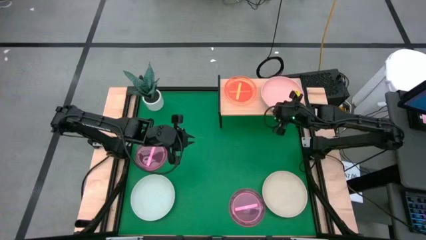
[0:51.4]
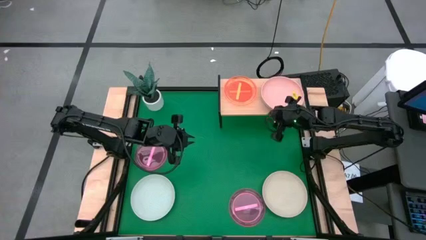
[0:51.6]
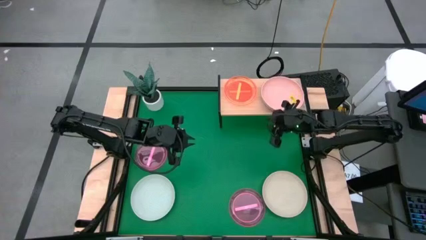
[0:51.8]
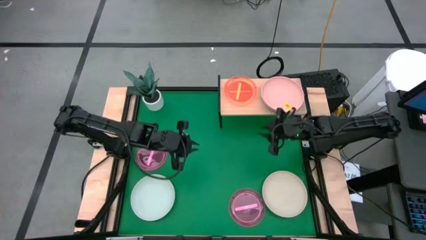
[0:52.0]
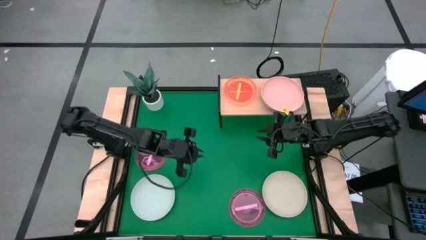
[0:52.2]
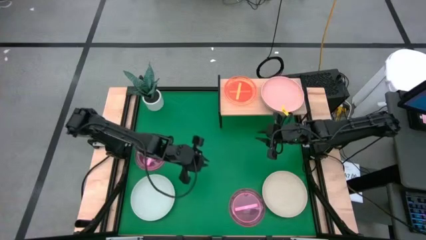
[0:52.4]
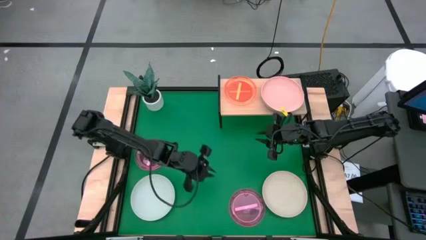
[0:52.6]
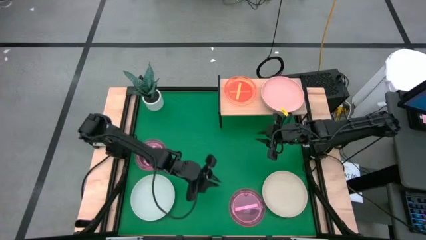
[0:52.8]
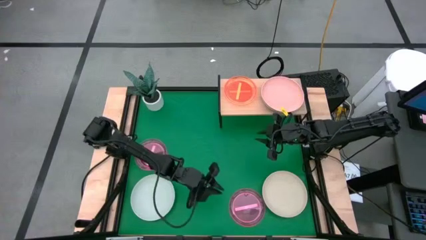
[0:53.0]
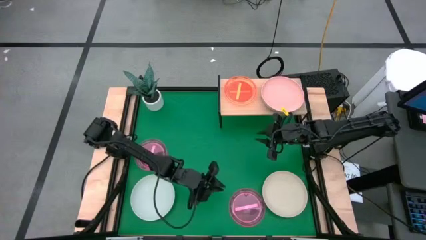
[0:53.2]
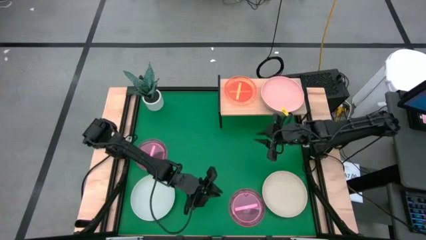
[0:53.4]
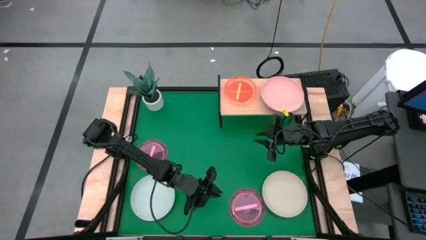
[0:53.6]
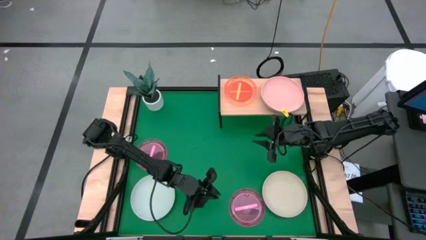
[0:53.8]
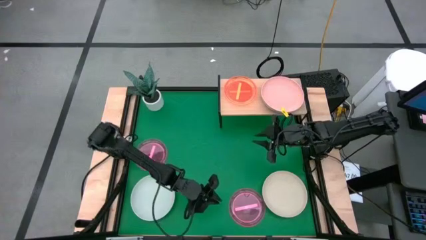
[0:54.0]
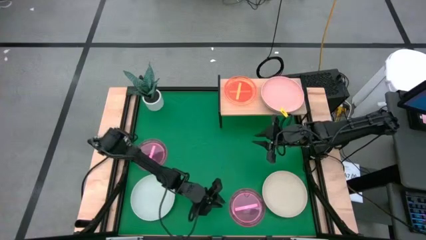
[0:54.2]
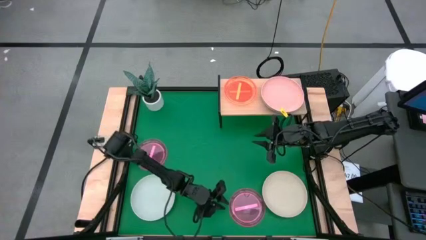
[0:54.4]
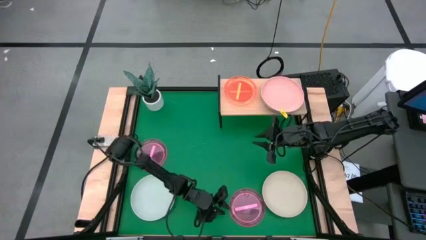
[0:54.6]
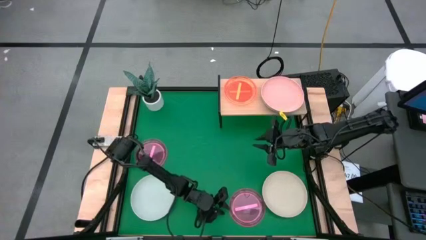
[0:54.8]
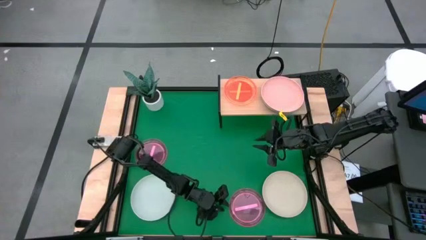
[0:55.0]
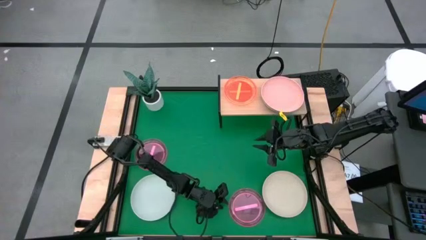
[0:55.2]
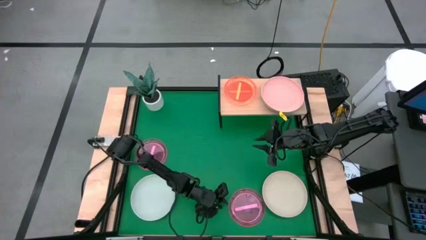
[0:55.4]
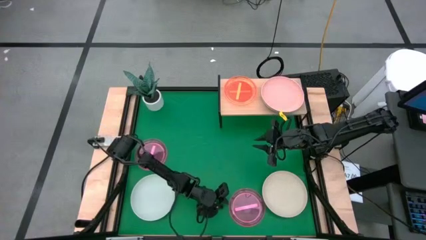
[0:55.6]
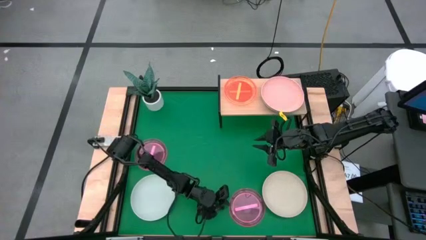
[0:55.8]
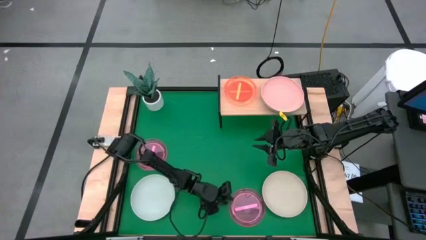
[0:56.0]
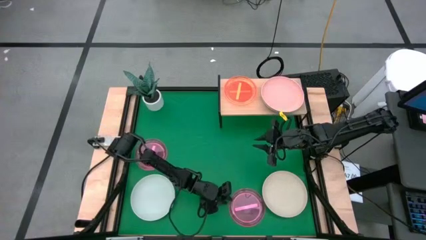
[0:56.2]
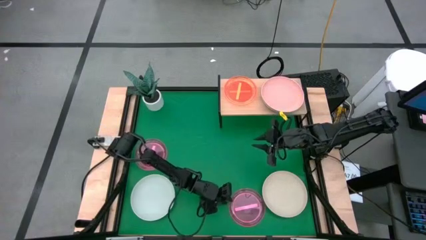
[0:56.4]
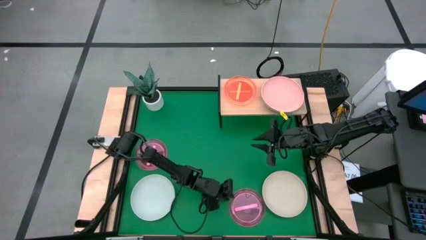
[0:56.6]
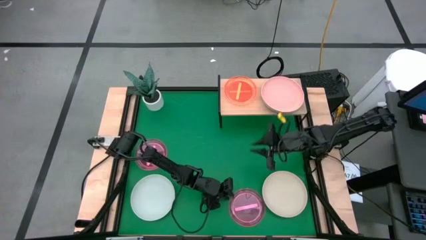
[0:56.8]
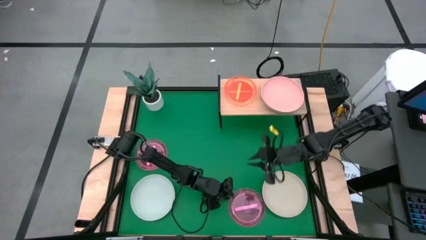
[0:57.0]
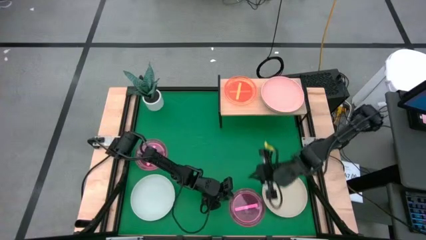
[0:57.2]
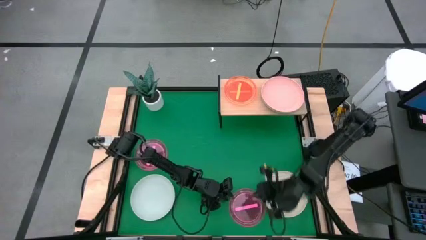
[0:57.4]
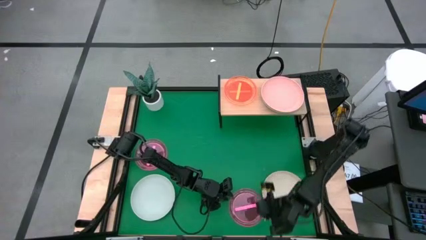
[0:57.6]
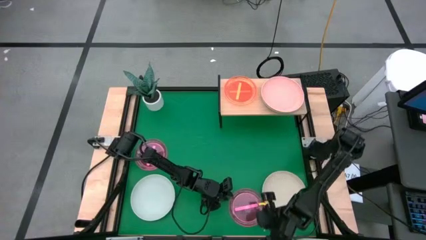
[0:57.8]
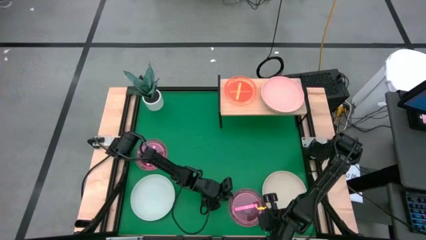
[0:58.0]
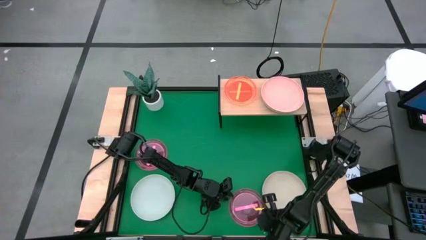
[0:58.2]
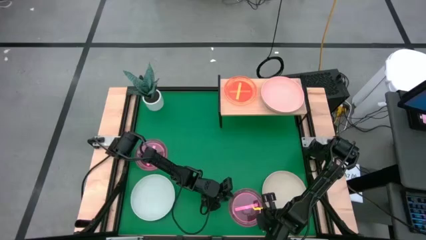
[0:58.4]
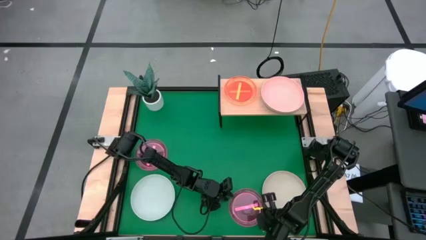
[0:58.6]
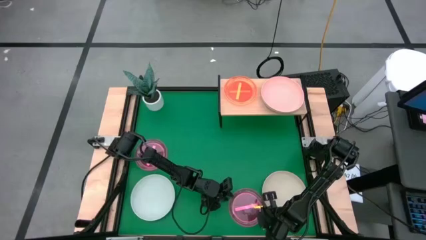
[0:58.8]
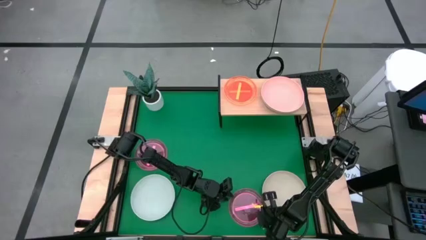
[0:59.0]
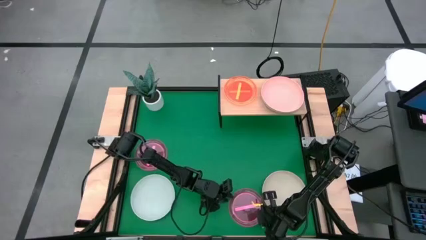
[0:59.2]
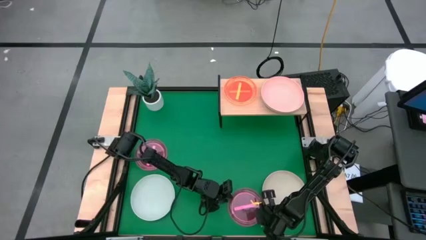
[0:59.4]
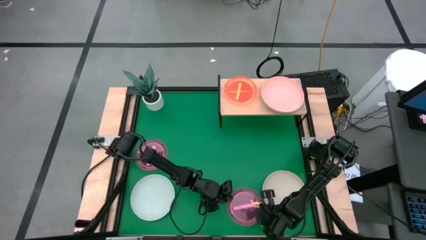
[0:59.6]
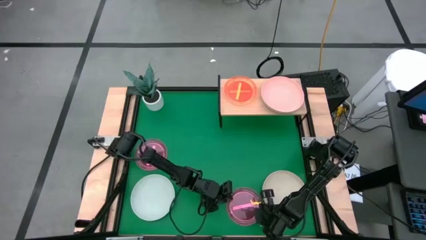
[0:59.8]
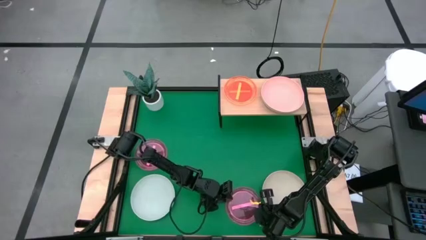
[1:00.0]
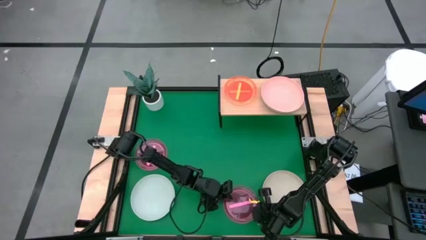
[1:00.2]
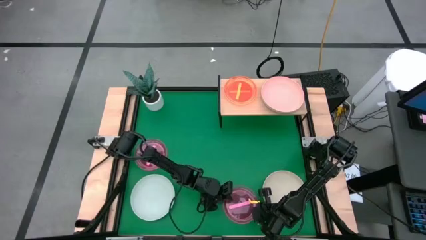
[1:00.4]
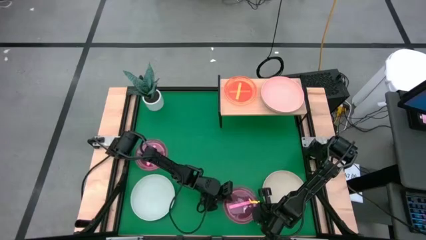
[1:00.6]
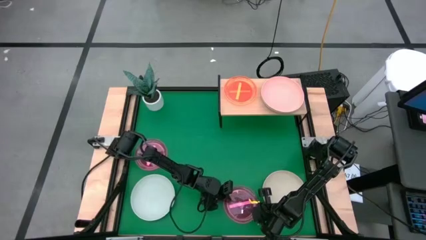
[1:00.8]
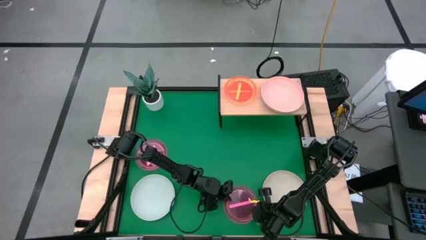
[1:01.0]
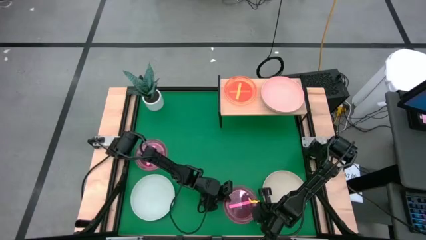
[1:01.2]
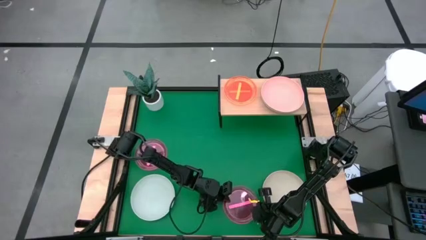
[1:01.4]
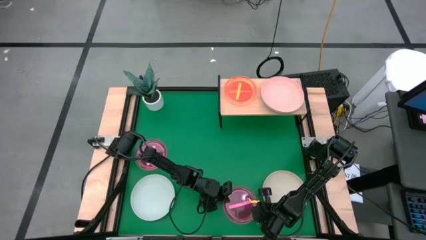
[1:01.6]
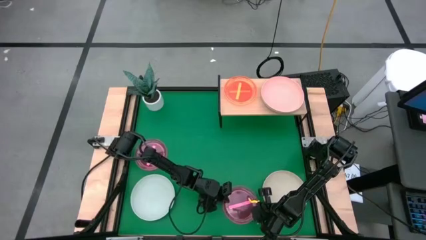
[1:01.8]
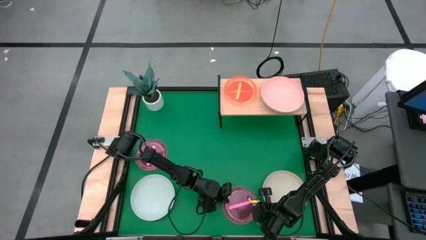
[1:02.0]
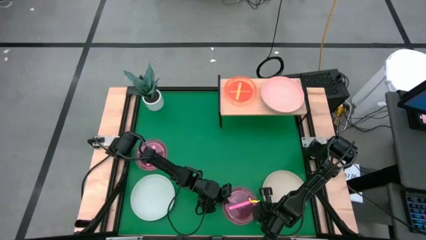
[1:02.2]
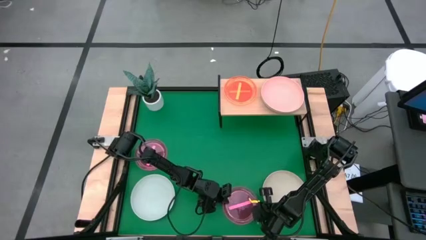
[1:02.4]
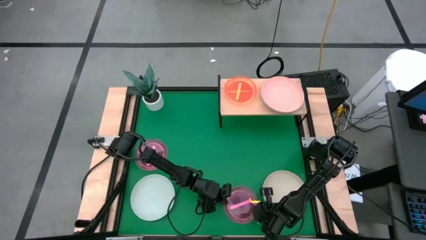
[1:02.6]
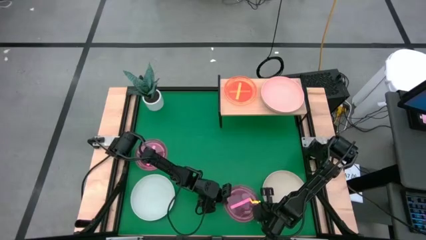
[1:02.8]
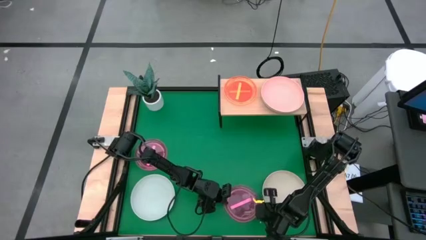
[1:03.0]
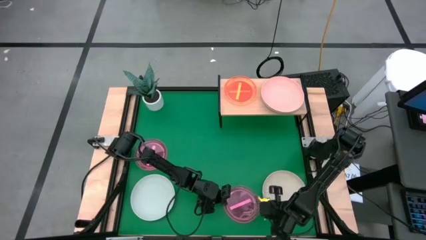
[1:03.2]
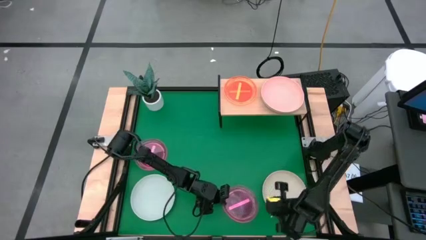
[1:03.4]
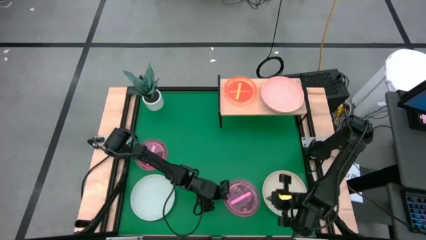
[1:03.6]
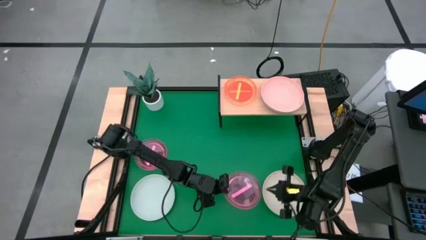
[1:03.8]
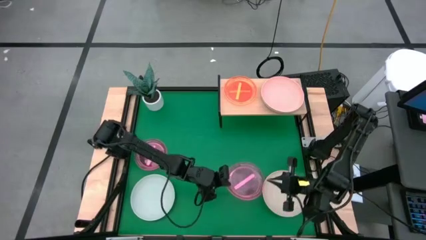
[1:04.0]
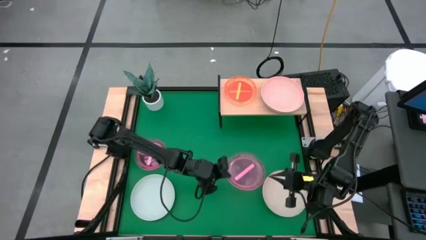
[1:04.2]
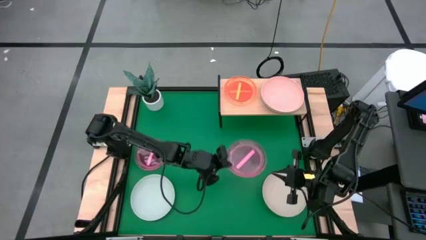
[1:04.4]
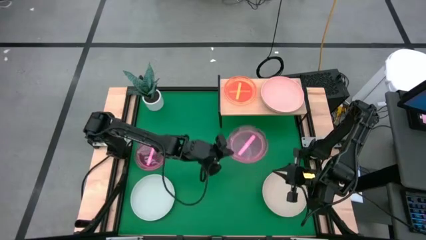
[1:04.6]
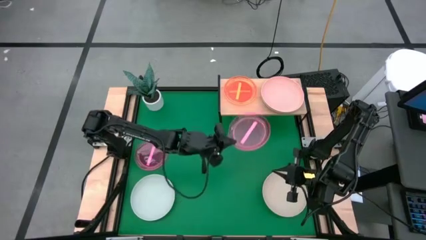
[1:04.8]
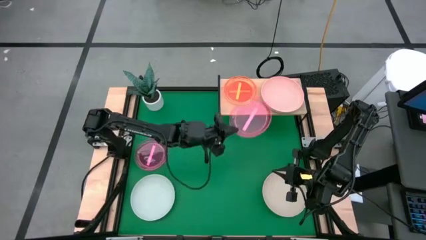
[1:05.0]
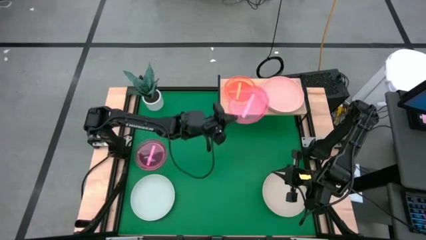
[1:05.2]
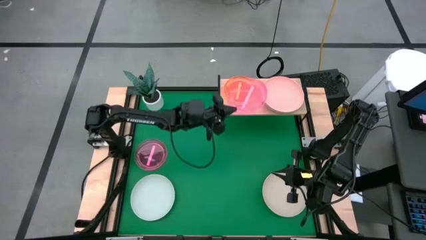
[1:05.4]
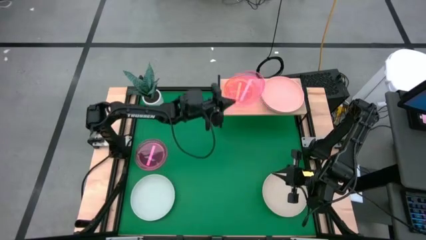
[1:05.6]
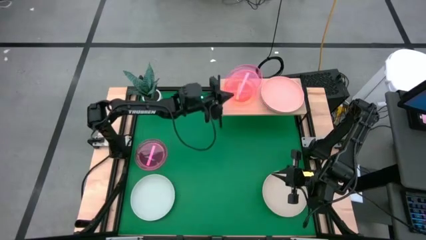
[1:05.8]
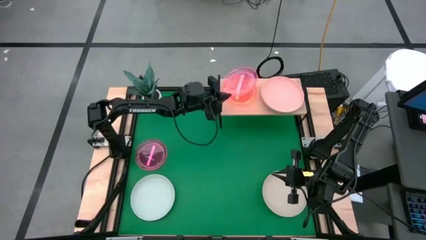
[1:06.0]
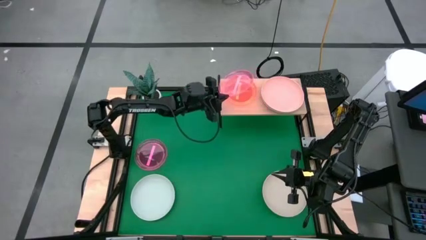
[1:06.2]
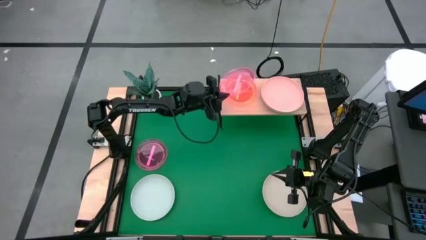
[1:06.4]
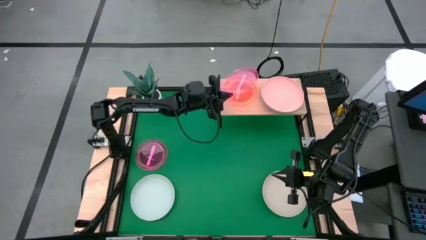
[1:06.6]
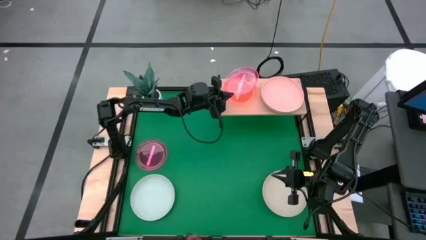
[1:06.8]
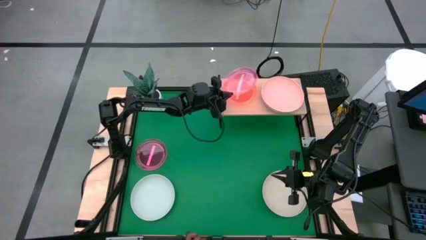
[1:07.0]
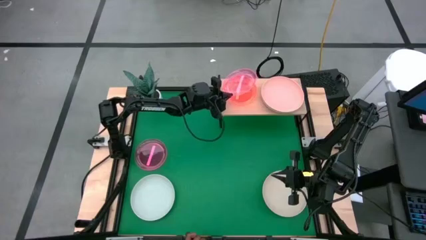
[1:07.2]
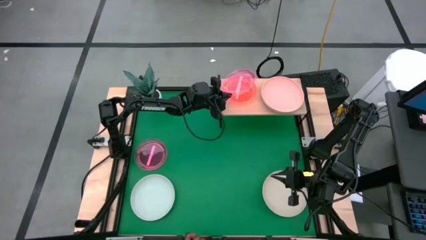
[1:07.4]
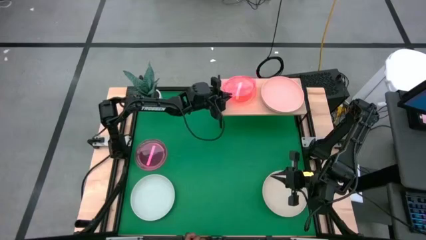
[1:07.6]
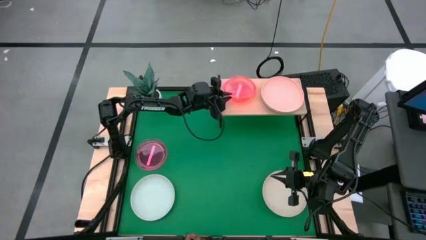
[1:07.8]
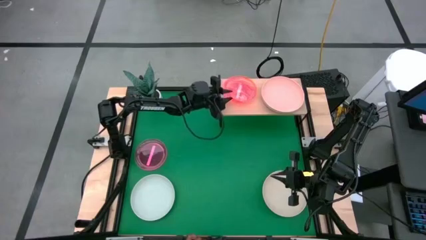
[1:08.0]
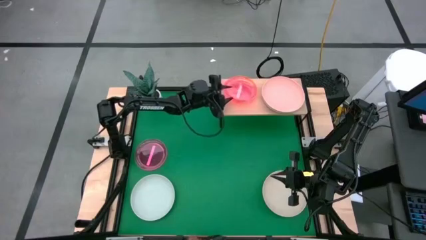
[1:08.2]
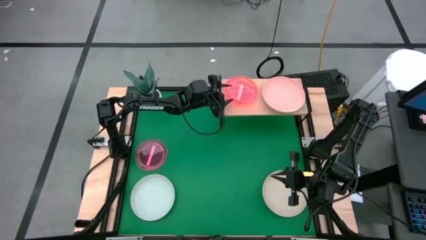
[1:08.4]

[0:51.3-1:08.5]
Task: Place and stack plates onto a shelf
Stack the right small pink plate on top of the small orange plate on the shelf
